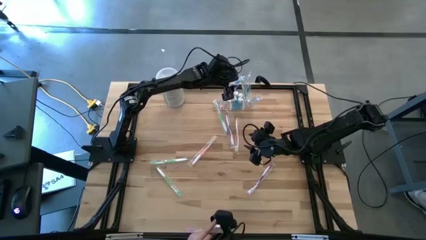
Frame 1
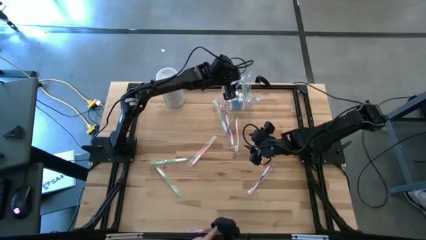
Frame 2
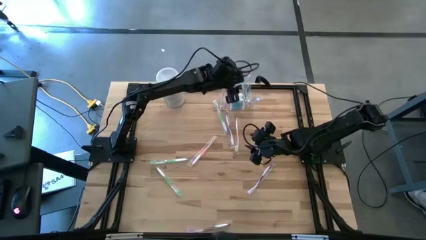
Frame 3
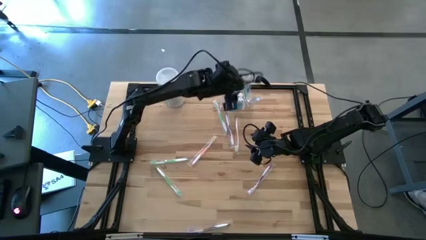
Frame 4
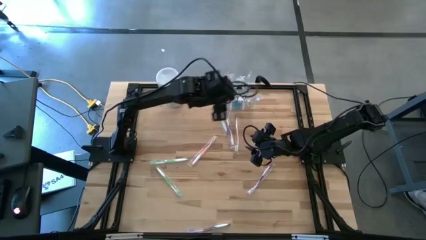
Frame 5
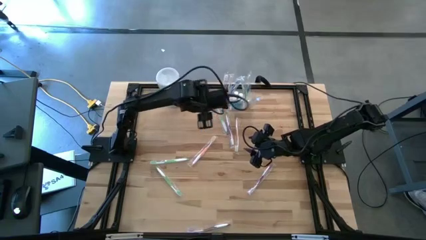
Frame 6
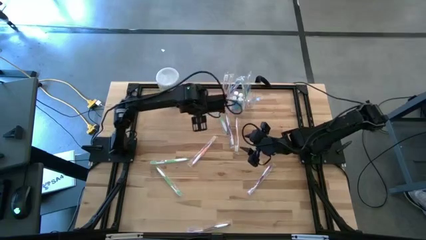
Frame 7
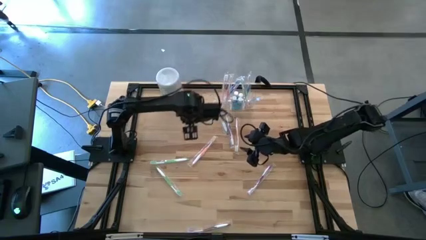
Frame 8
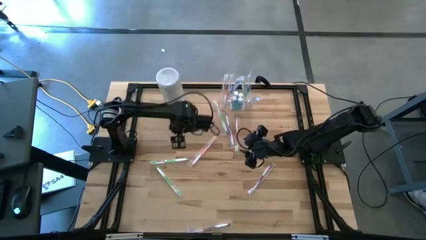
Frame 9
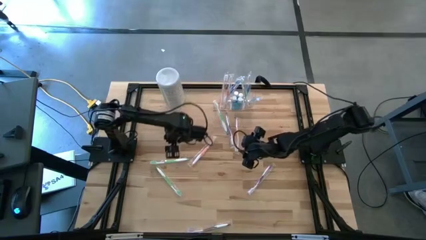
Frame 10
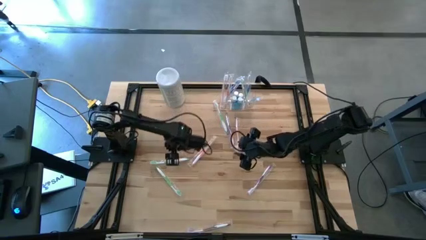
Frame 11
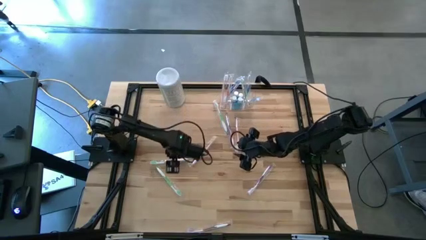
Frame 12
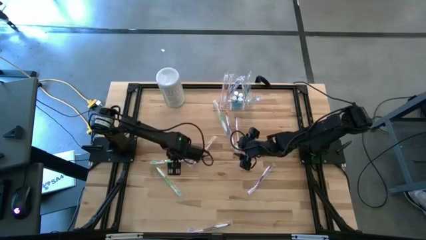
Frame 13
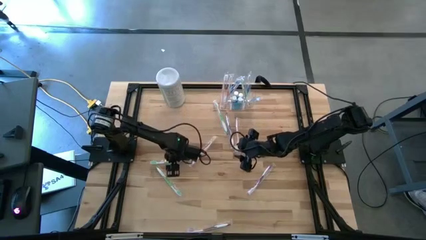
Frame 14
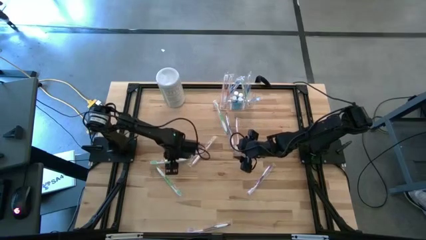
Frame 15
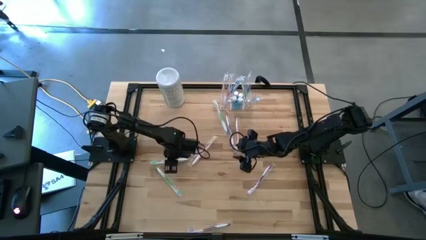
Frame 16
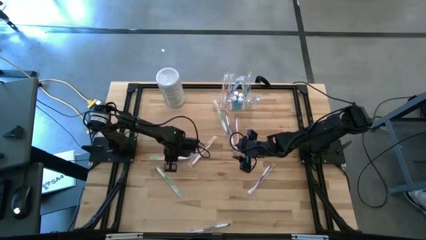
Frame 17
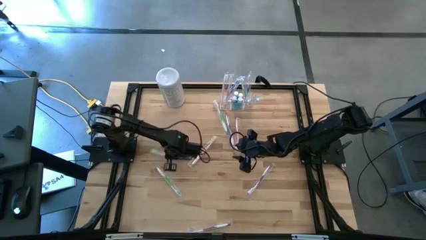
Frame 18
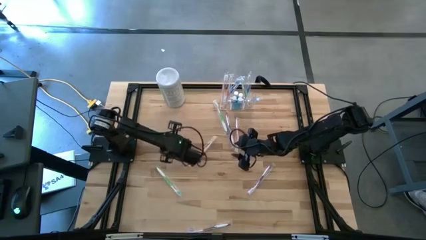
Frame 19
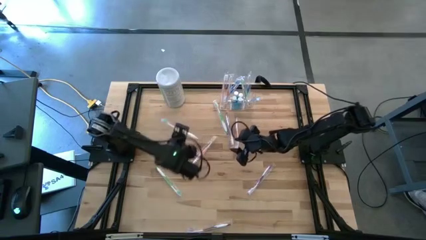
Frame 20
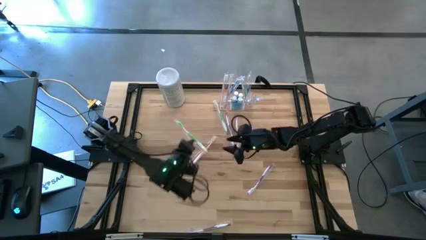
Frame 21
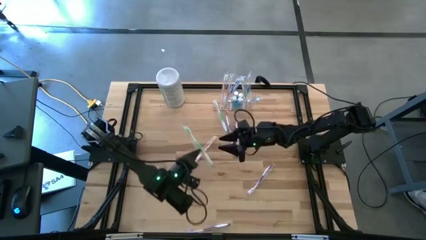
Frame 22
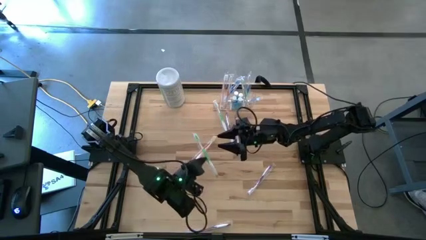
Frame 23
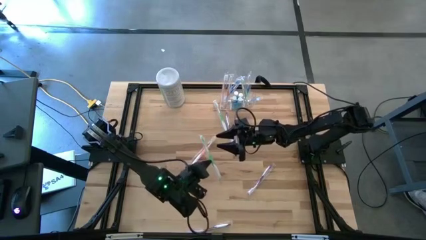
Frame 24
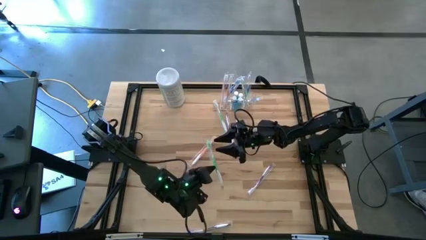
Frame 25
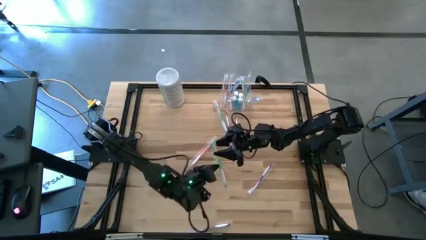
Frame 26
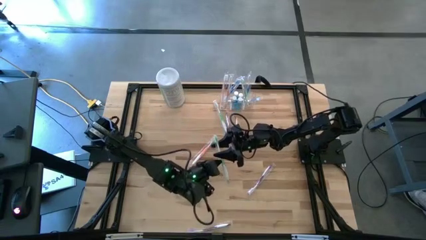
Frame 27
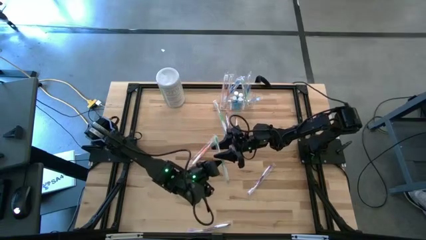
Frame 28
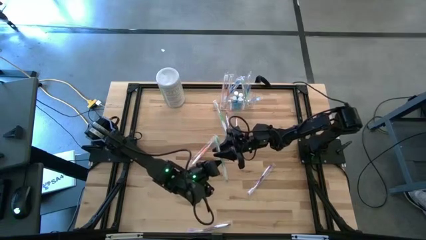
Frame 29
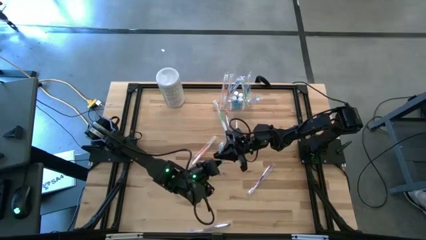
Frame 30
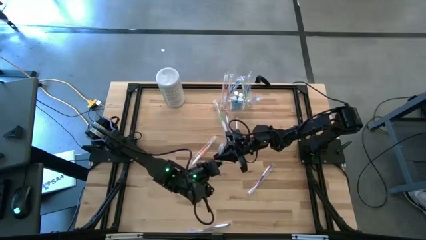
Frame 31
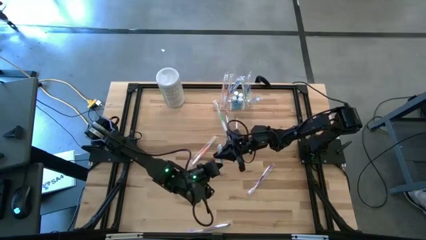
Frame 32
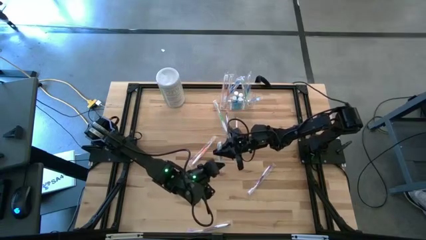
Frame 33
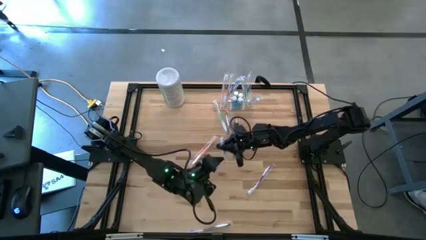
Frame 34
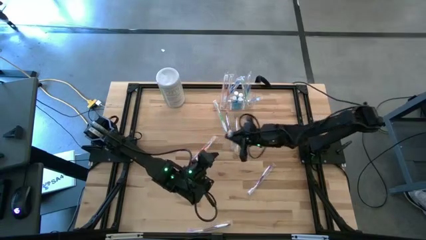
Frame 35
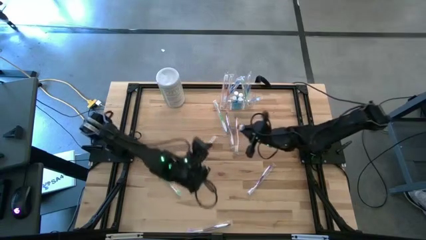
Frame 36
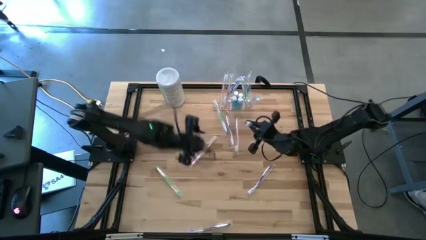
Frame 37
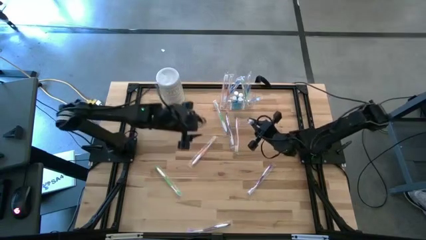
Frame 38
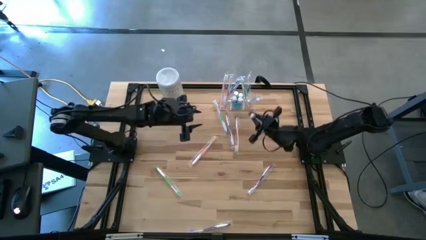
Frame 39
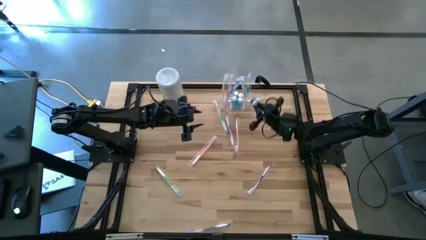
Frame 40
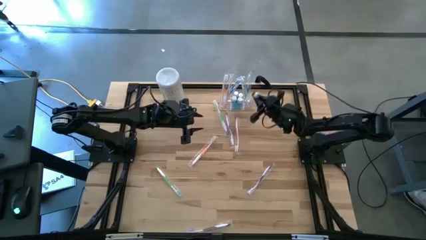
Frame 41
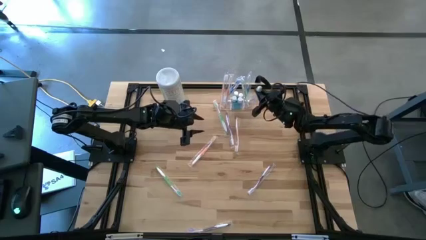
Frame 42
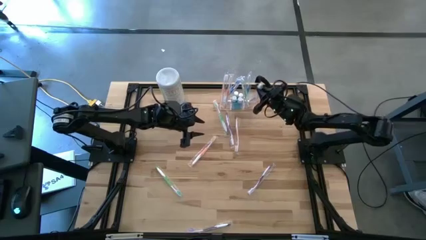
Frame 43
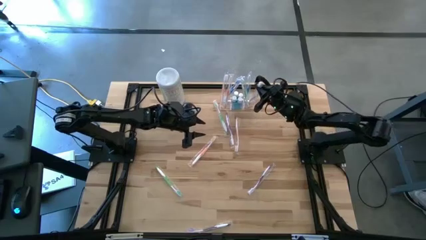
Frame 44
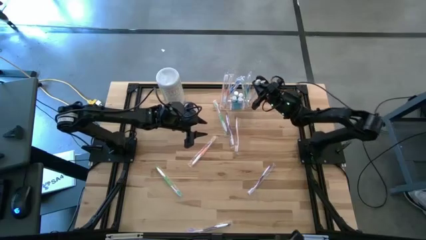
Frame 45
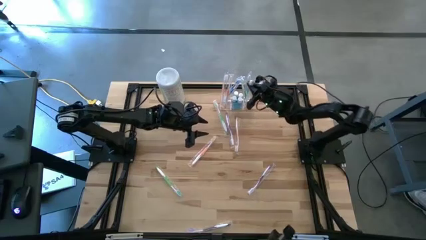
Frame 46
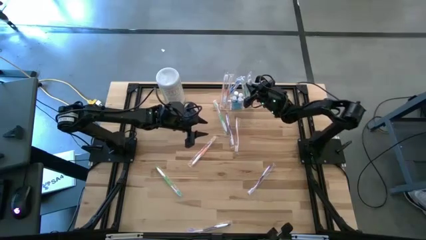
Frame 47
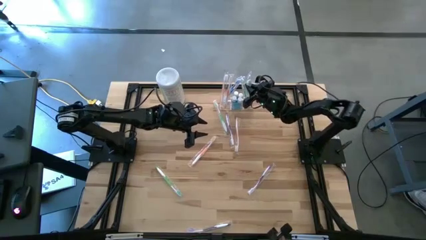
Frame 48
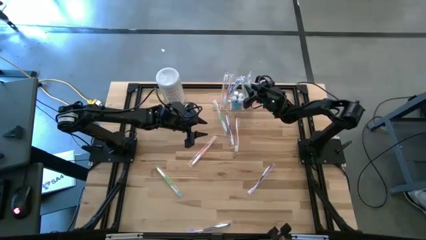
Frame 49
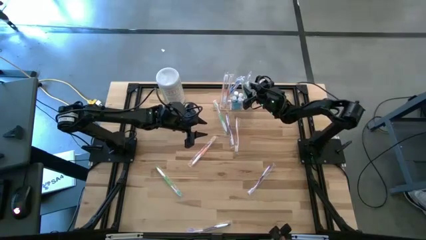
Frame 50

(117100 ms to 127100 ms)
Task: Pick & Place toothbrushing station
Put the green toothbrush into the transparent organizer

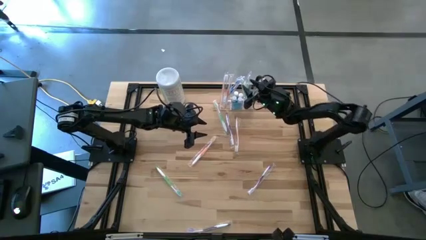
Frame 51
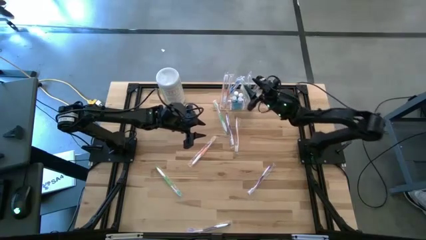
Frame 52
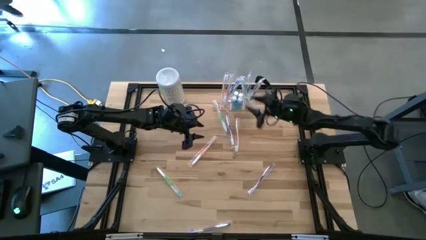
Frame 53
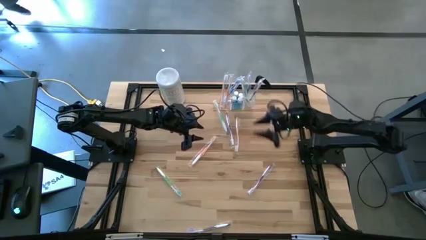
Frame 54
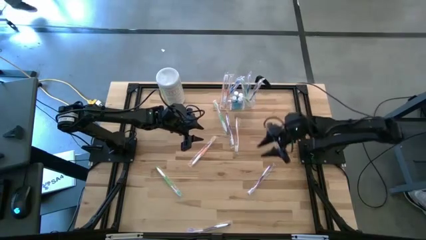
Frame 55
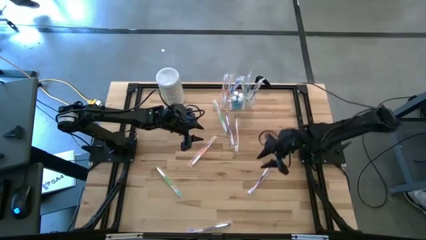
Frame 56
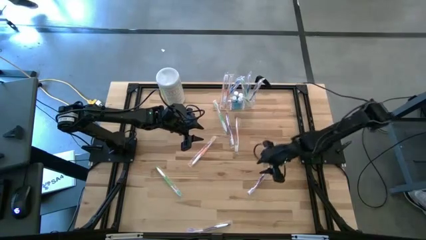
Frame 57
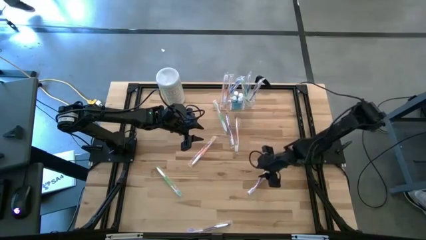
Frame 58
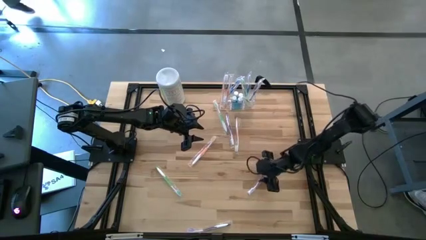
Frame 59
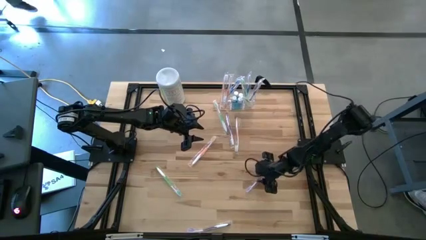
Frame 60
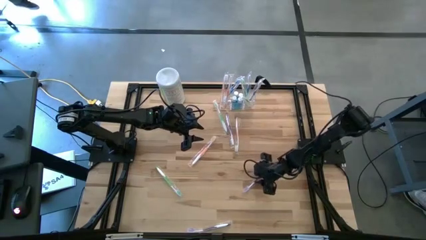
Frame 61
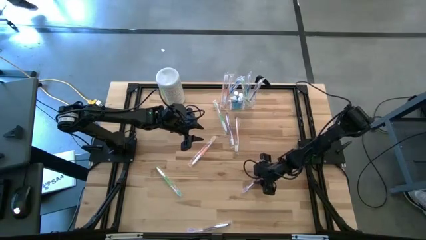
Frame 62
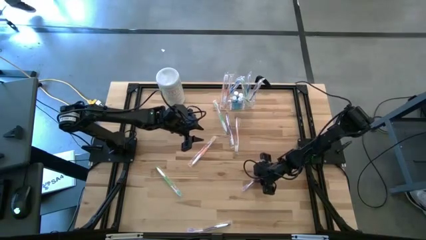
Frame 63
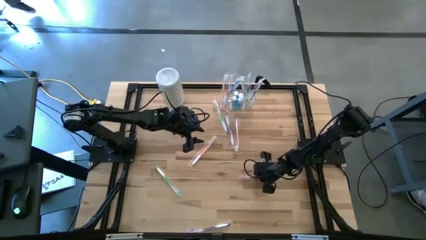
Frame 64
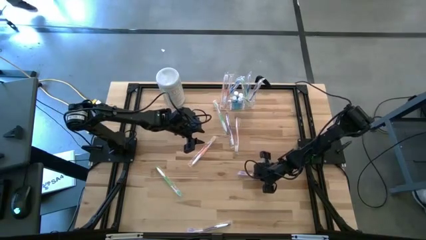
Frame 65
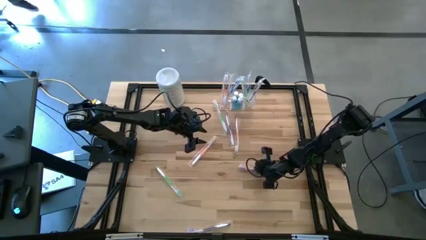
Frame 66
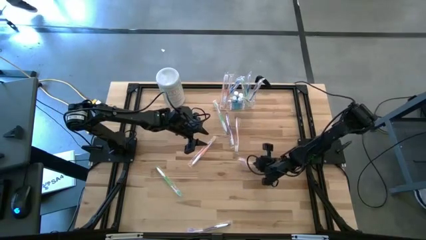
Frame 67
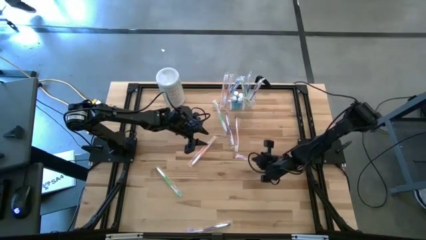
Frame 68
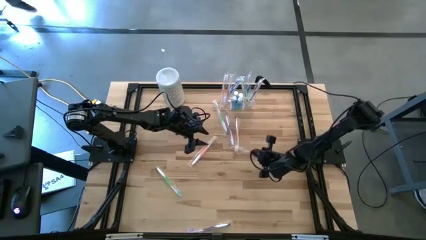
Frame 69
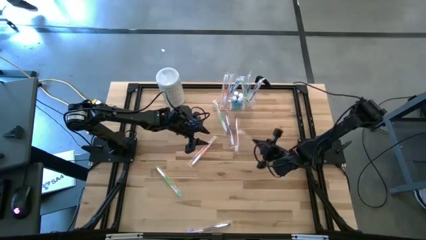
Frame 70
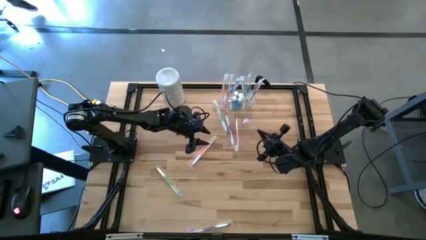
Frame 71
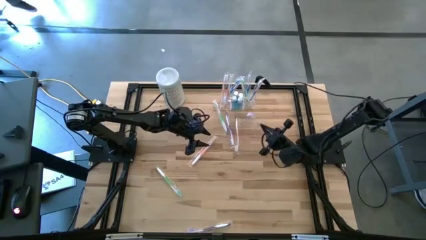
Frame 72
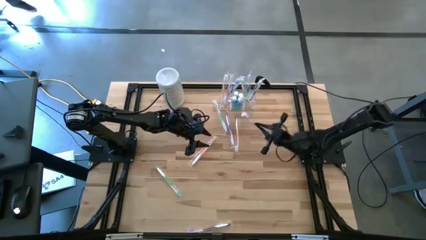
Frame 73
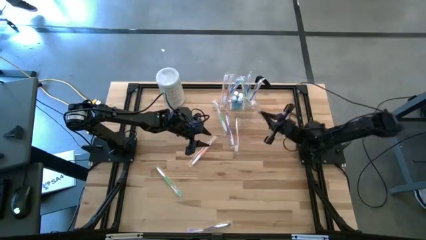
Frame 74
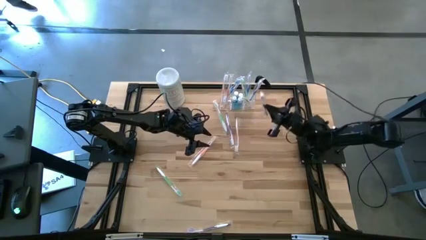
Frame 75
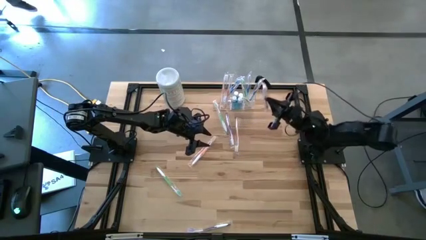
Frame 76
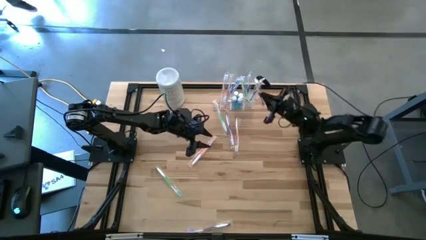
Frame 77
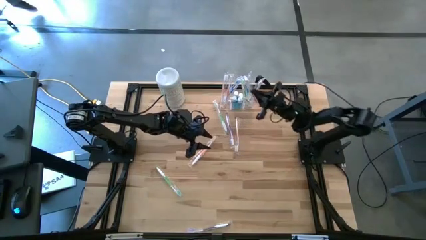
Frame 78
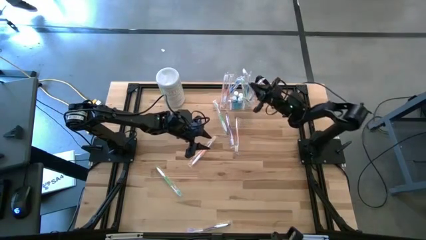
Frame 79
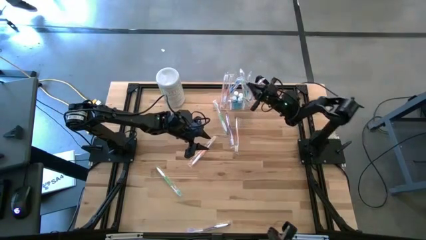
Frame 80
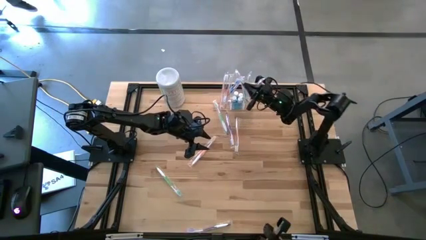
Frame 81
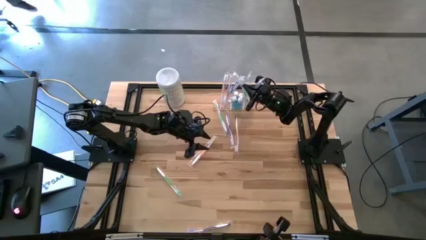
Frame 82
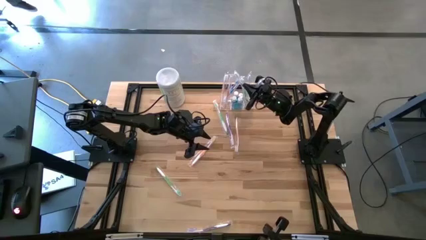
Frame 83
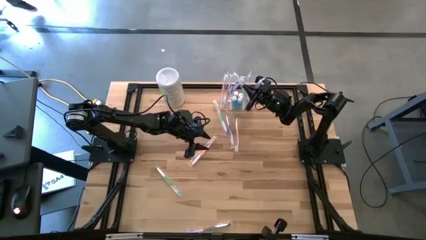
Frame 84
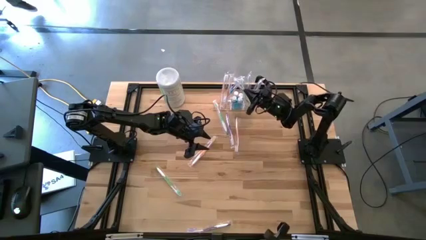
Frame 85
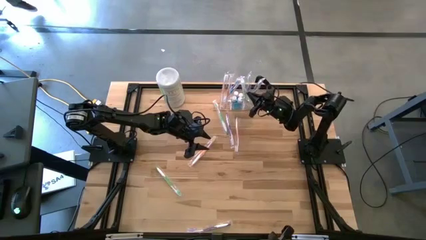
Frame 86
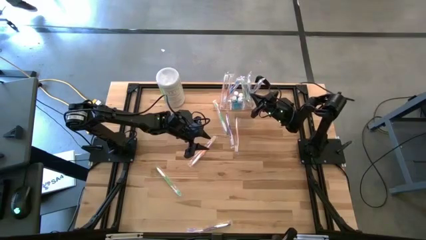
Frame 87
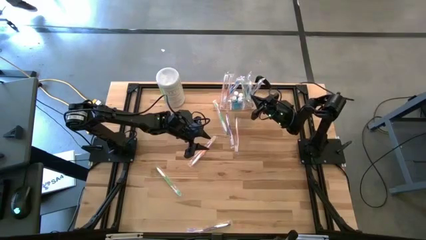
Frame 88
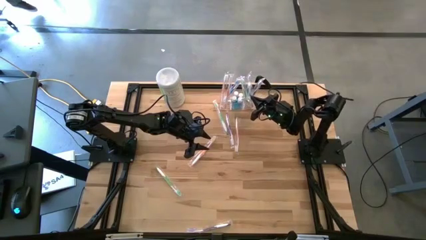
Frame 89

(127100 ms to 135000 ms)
Put the violet toothbrush into the transparent organizer
